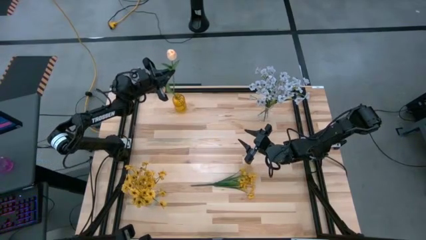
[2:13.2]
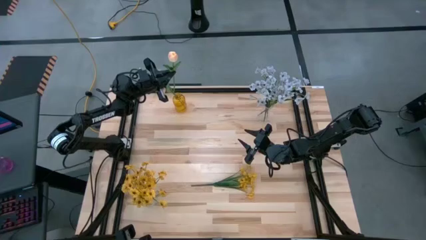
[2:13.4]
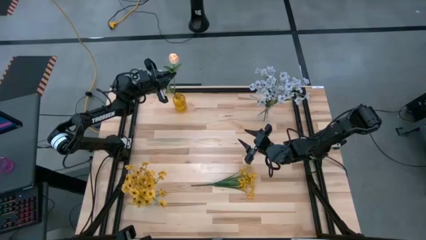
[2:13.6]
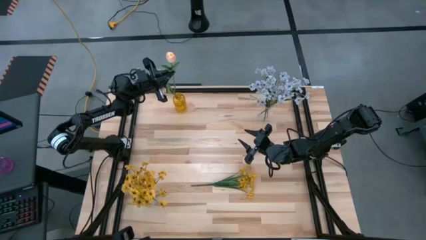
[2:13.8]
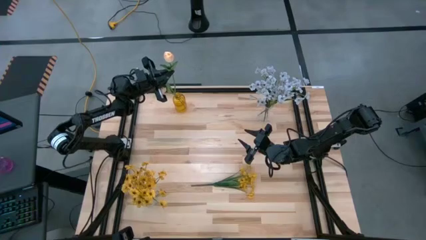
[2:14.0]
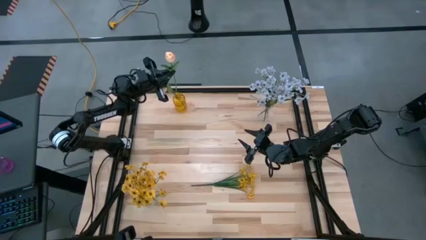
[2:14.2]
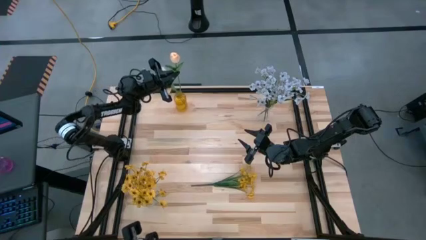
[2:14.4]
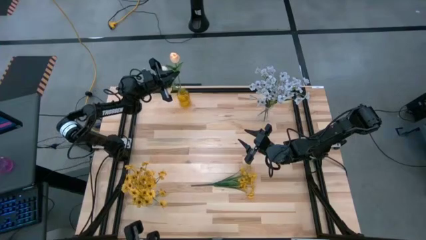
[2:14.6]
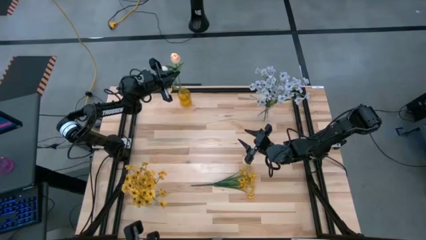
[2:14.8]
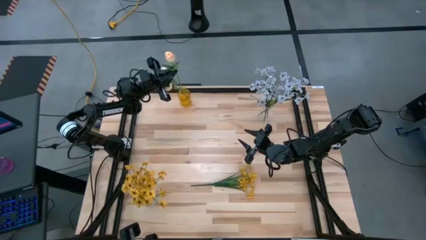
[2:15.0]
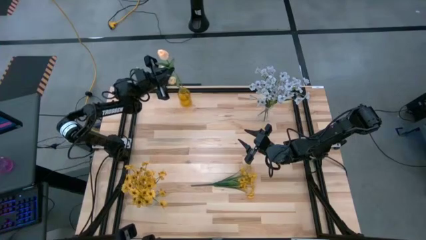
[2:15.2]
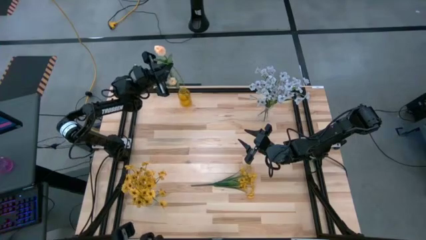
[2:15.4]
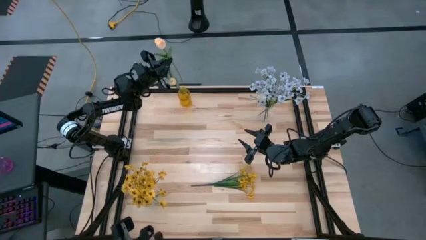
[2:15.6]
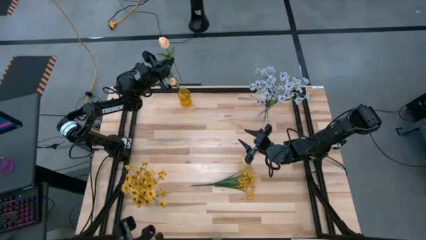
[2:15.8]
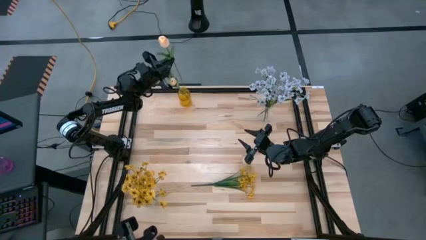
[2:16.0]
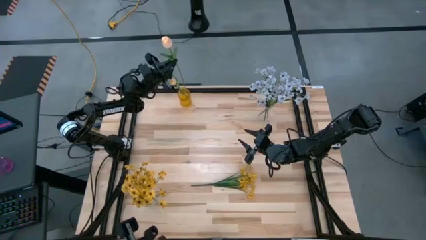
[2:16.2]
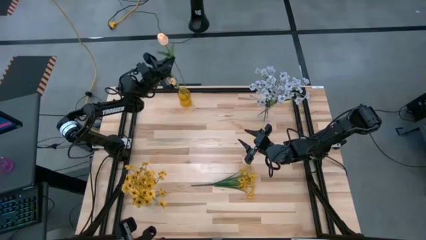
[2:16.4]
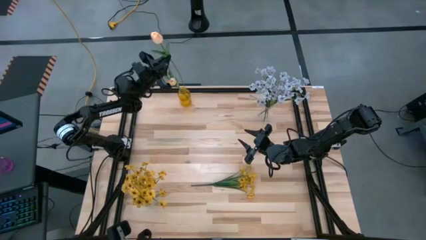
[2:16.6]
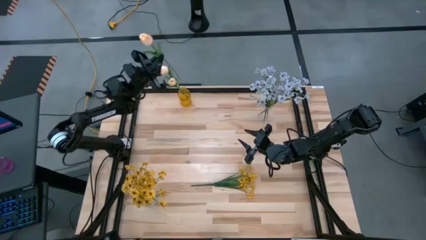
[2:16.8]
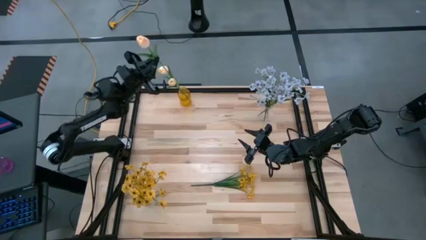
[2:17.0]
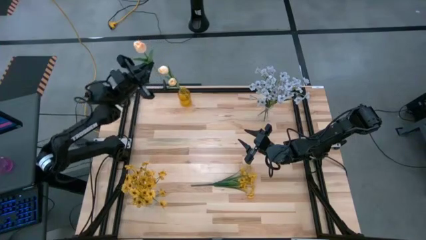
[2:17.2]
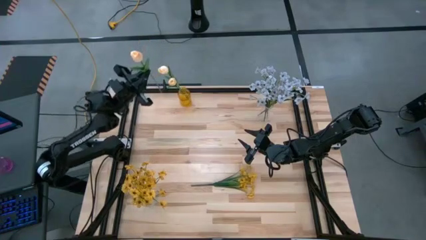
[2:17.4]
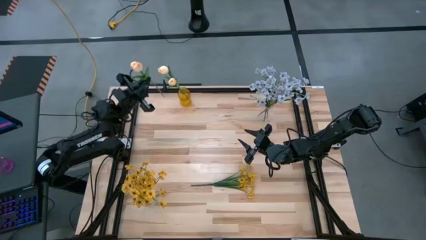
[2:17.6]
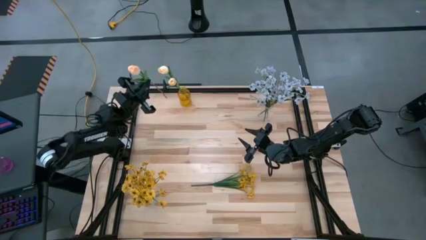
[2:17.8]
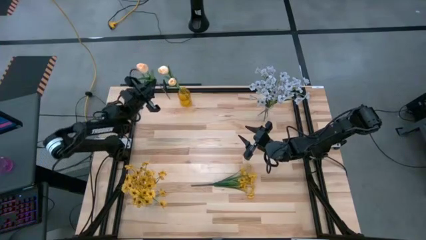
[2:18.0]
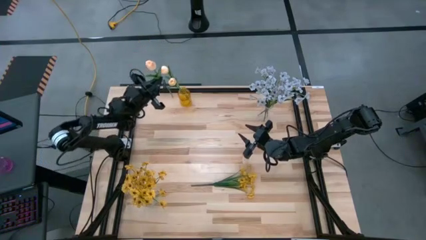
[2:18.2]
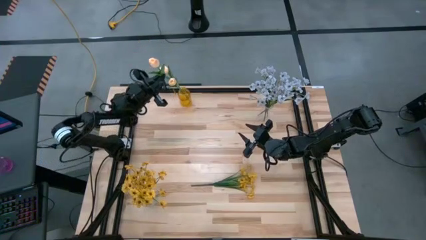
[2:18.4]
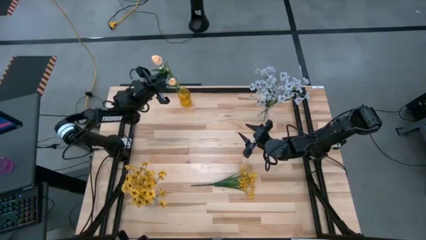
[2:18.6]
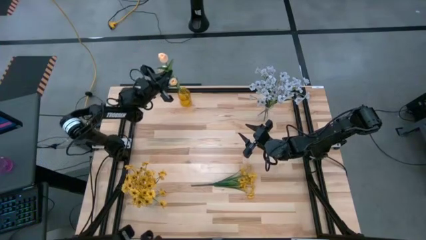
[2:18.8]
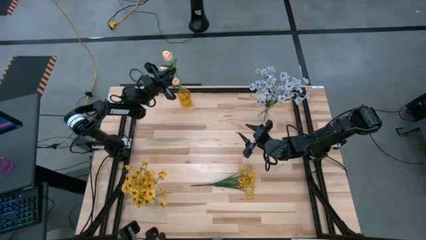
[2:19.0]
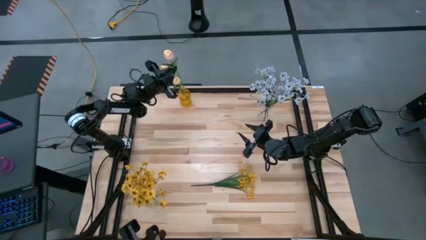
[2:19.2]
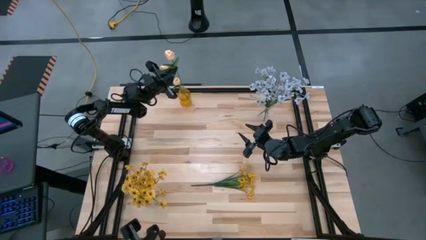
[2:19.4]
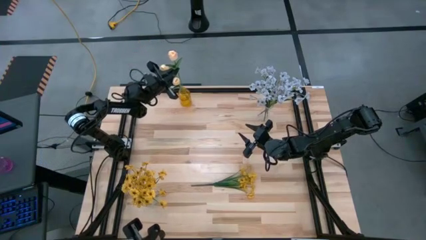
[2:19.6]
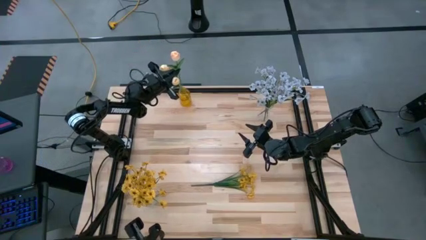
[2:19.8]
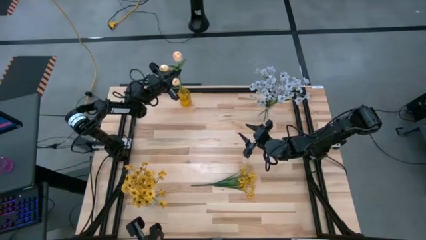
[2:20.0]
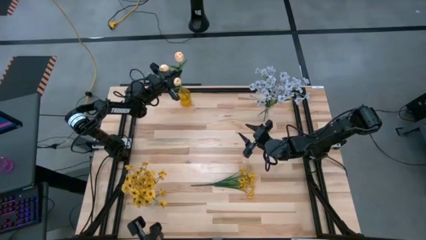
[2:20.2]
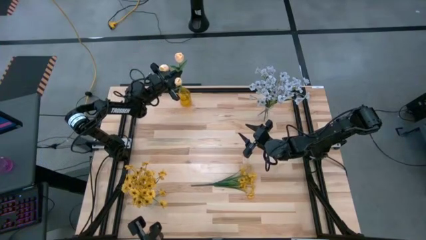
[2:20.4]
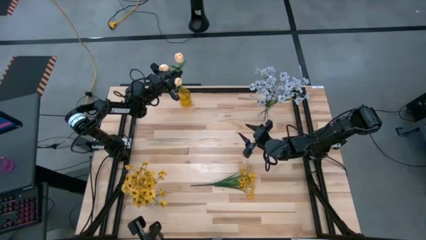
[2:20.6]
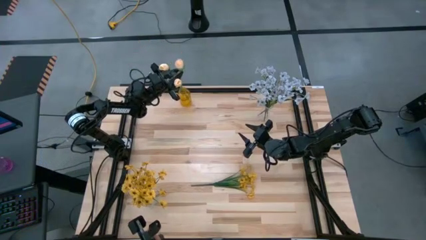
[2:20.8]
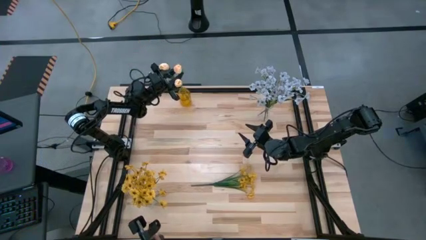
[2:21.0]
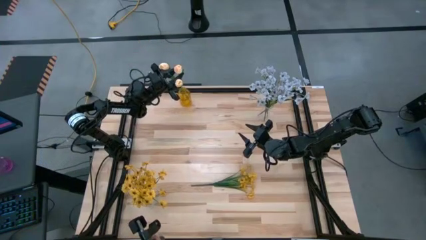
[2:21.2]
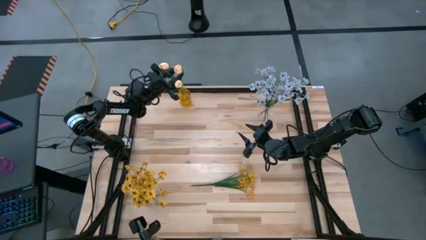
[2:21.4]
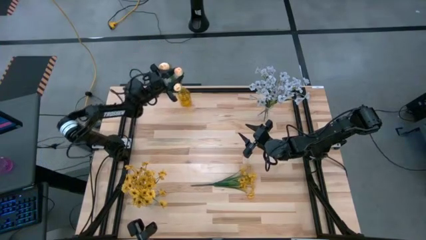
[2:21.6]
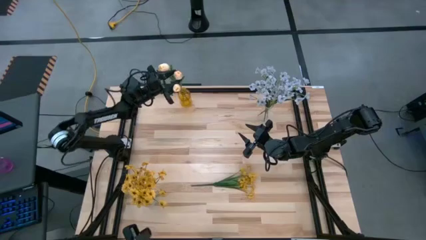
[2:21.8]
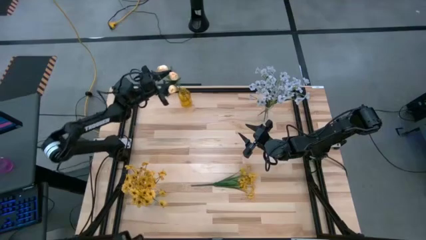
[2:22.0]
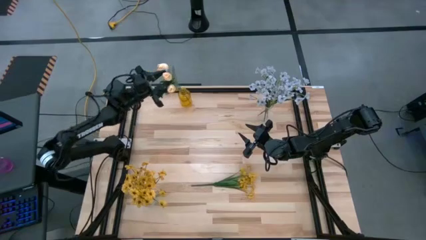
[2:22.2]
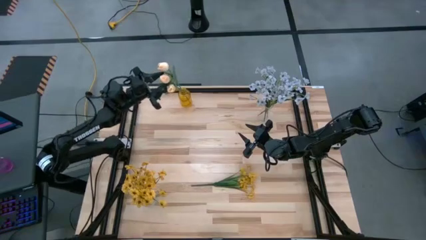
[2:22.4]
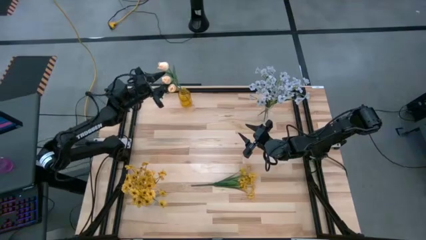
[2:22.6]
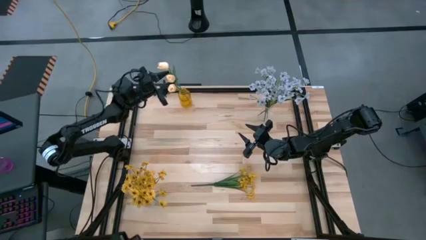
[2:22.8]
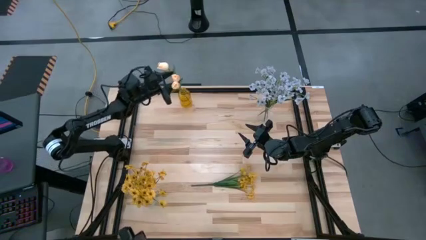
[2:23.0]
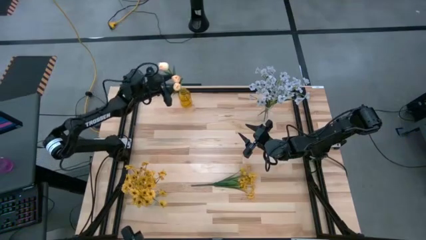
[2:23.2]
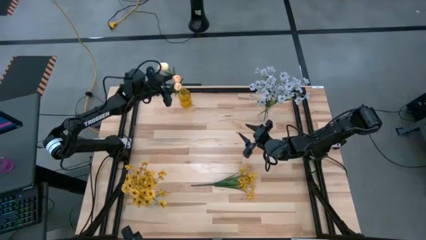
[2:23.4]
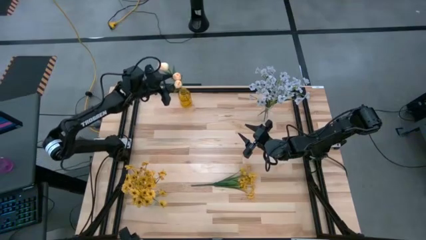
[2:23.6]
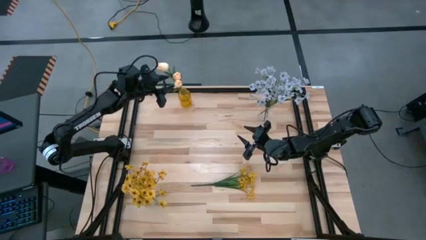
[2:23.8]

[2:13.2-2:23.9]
Task: Sort flowers into vase by color
Put the pink tulip into the yellow vase

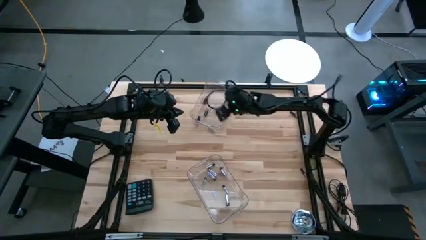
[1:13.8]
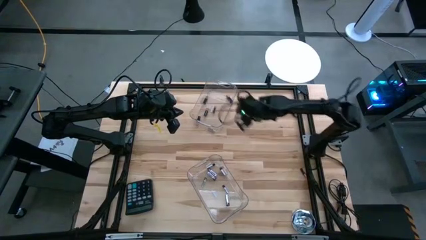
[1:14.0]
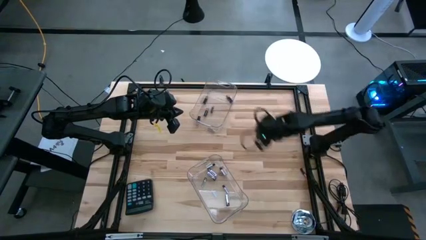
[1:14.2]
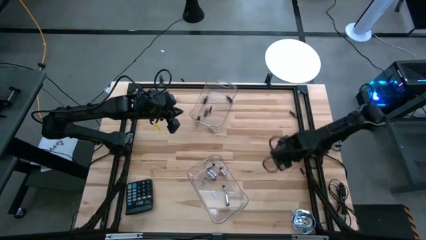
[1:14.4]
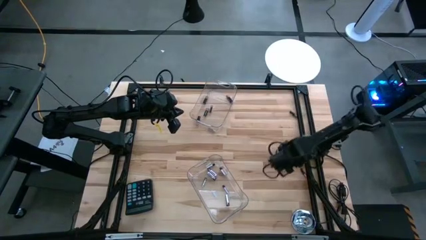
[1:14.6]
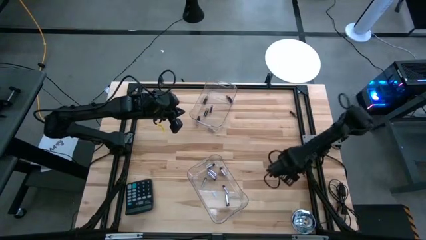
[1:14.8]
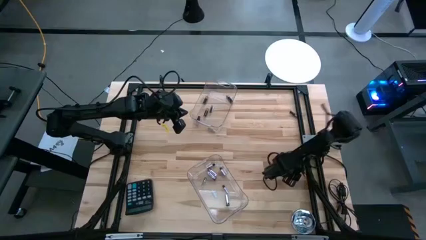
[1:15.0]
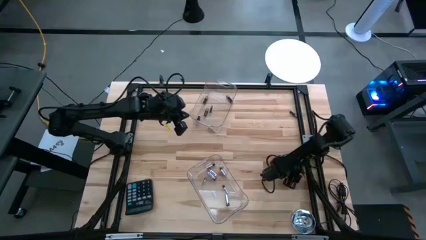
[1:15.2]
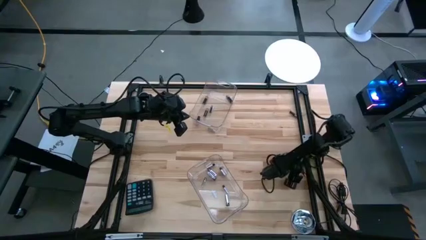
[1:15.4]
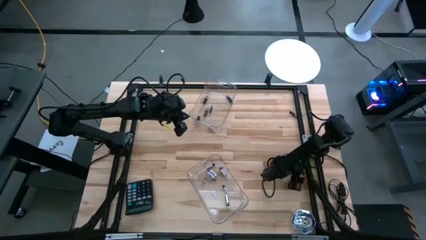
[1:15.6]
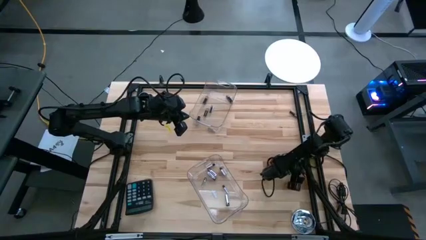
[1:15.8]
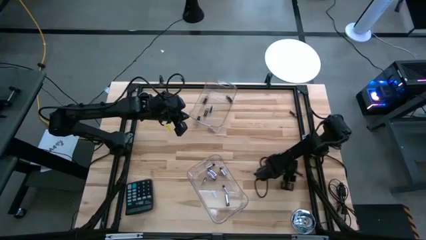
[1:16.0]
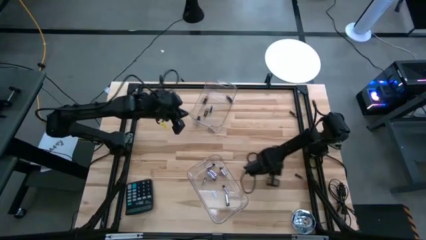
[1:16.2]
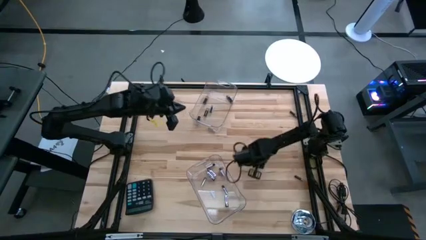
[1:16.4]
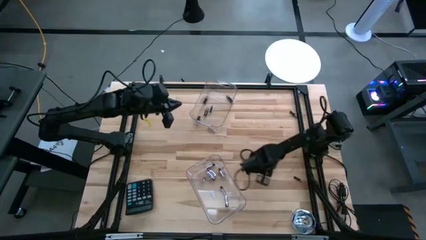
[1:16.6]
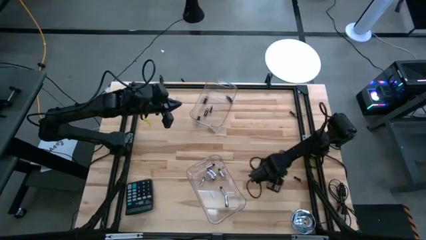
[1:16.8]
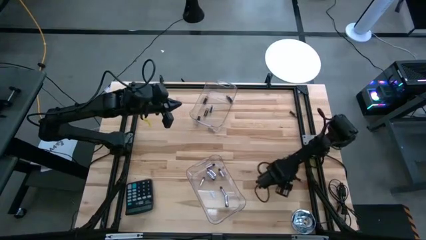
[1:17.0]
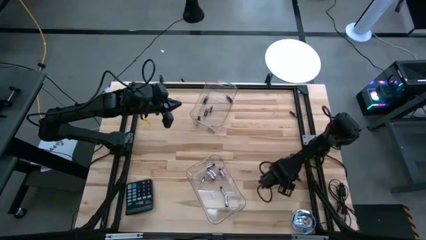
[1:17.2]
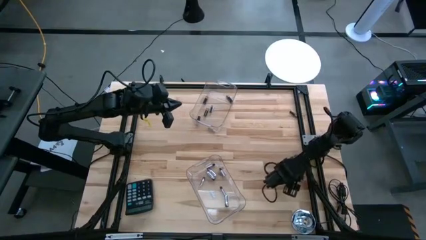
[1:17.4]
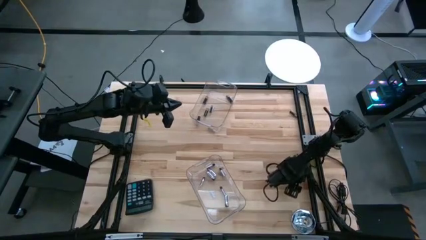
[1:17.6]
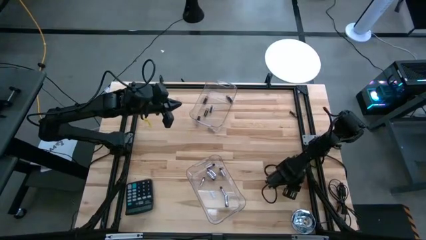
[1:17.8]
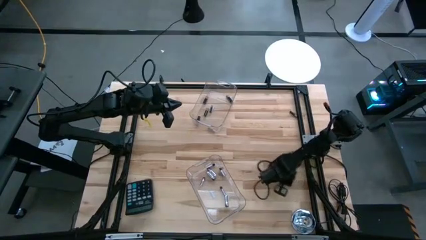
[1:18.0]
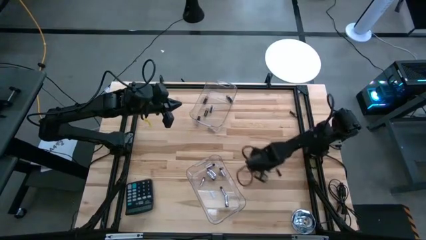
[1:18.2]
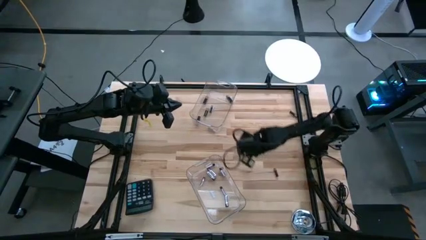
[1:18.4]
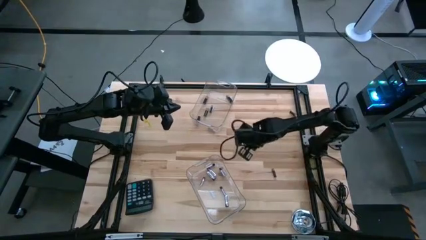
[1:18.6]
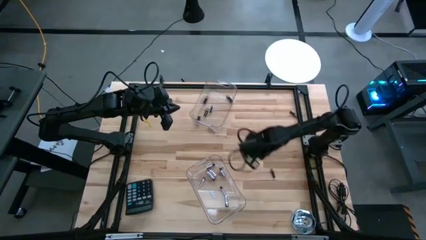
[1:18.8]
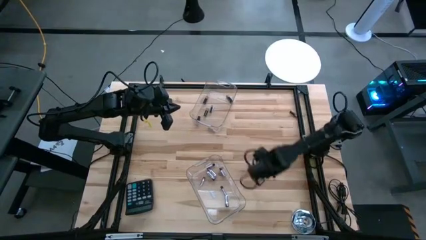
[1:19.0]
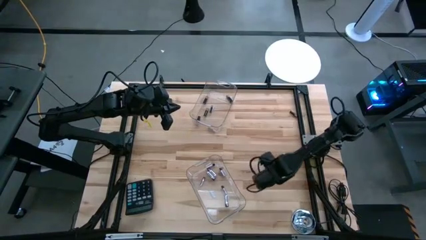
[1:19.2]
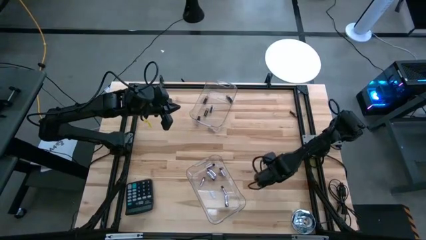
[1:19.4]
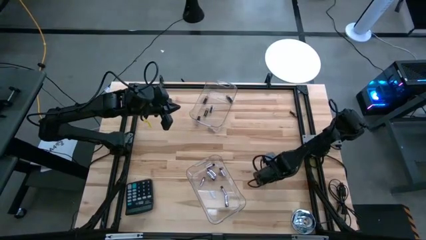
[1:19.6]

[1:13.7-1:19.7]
Task: Sort batteries
Put the black battery into the top transparent bin
